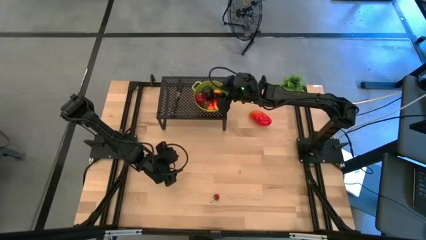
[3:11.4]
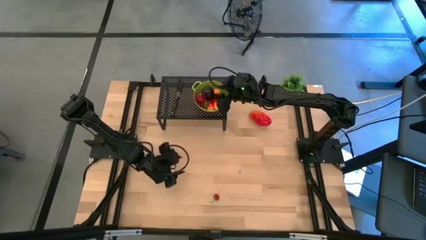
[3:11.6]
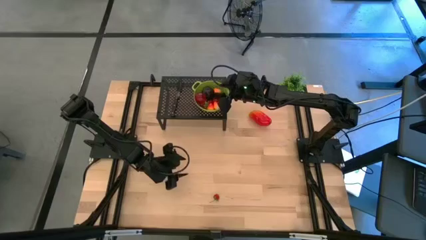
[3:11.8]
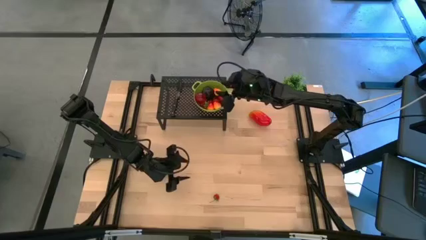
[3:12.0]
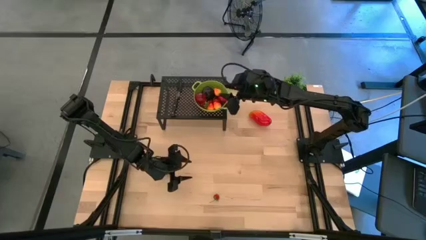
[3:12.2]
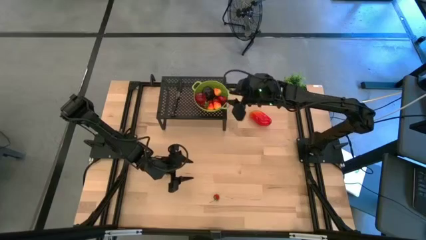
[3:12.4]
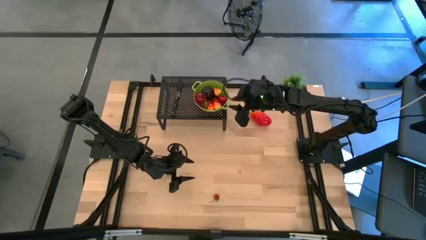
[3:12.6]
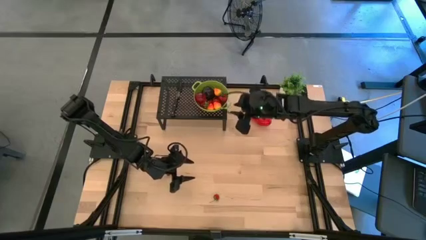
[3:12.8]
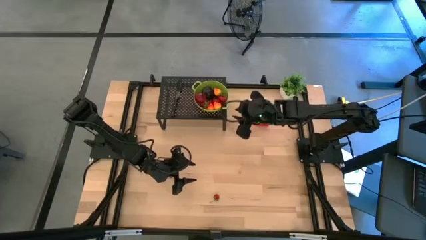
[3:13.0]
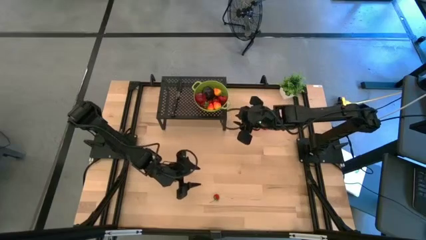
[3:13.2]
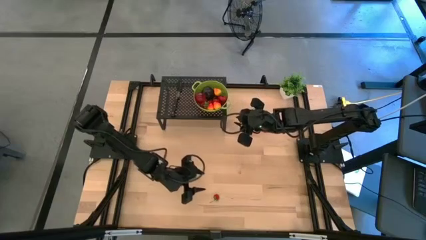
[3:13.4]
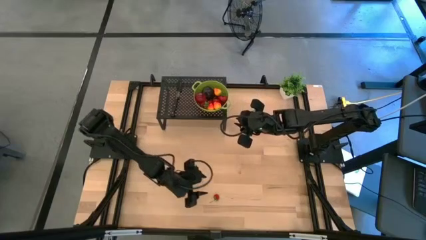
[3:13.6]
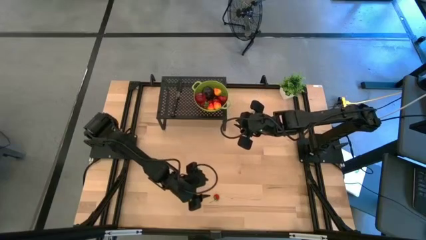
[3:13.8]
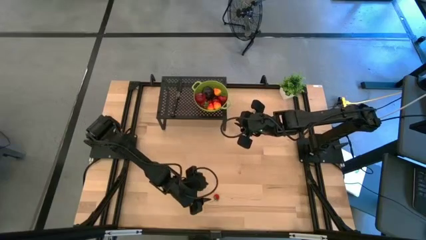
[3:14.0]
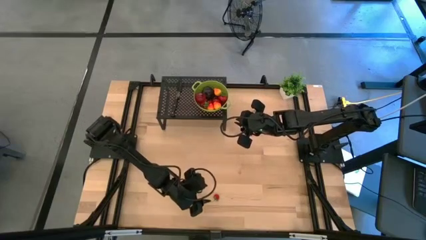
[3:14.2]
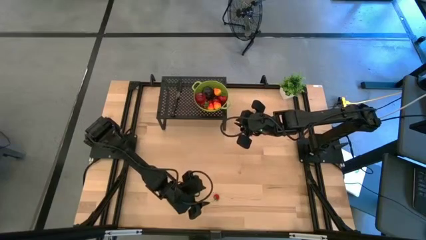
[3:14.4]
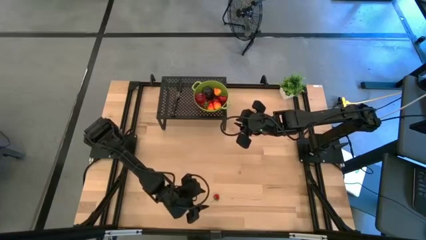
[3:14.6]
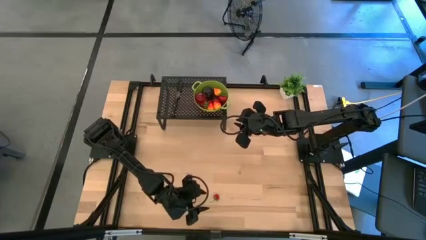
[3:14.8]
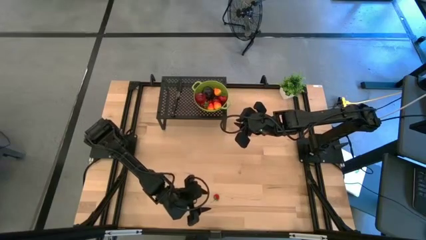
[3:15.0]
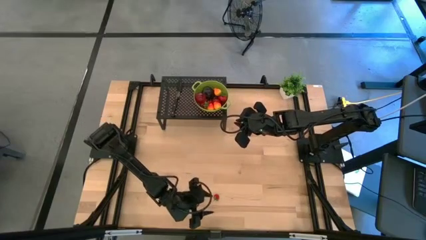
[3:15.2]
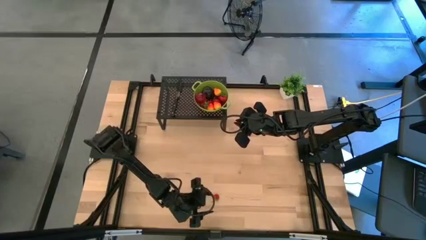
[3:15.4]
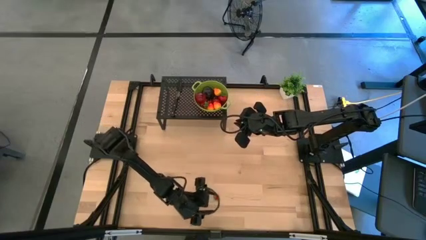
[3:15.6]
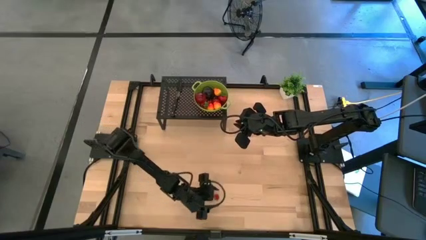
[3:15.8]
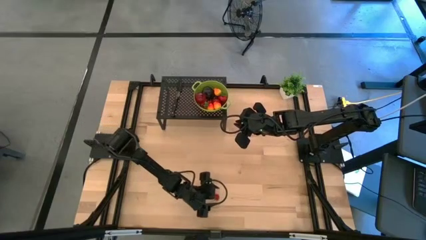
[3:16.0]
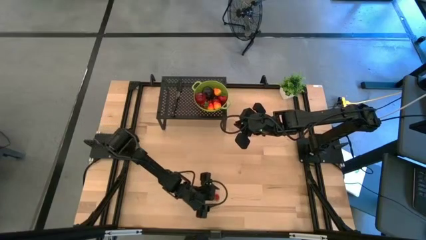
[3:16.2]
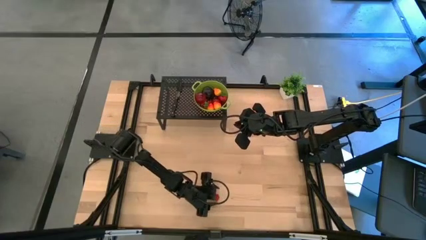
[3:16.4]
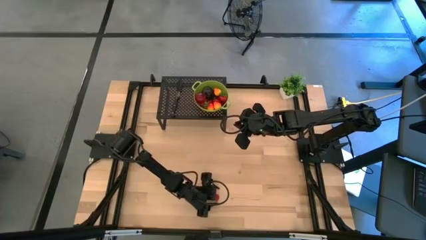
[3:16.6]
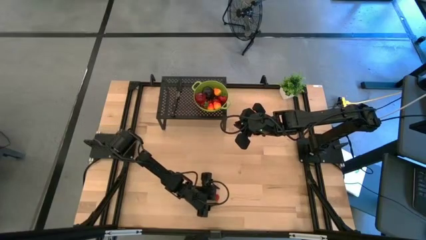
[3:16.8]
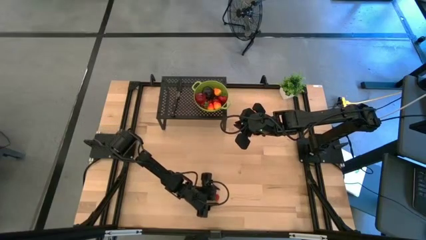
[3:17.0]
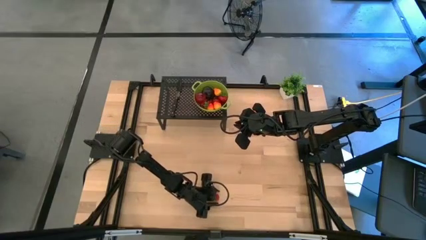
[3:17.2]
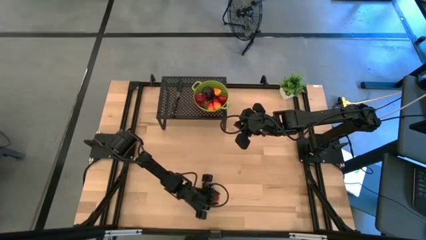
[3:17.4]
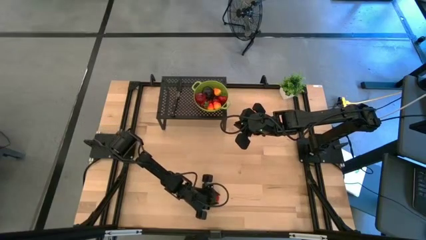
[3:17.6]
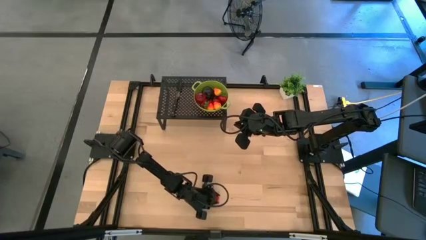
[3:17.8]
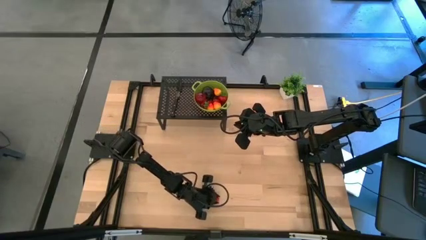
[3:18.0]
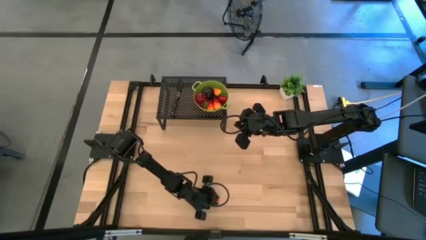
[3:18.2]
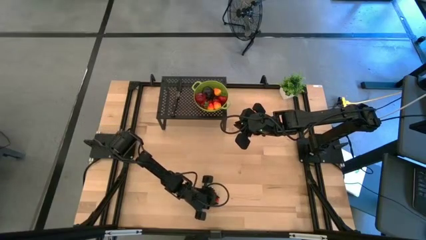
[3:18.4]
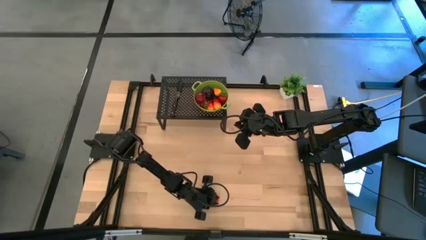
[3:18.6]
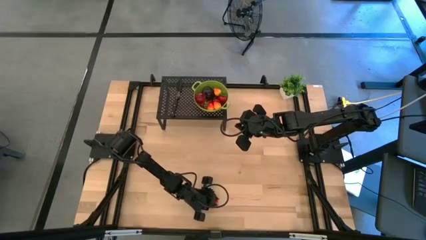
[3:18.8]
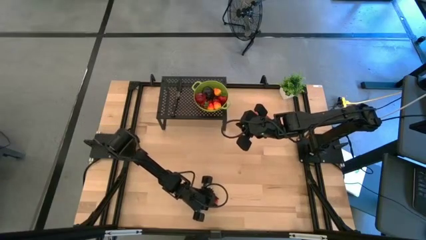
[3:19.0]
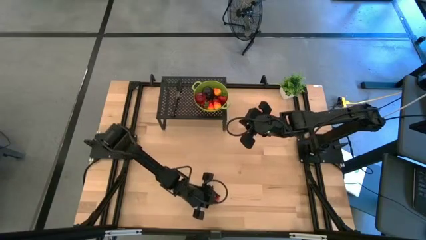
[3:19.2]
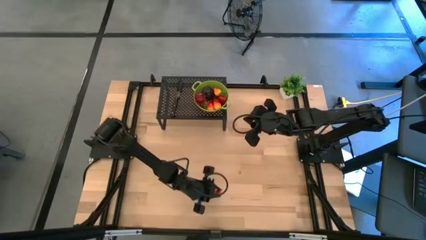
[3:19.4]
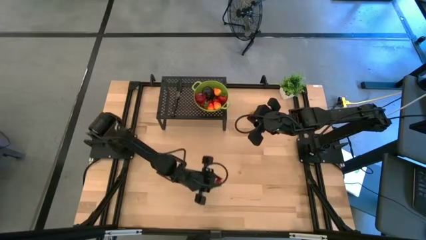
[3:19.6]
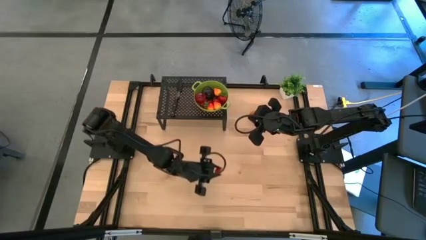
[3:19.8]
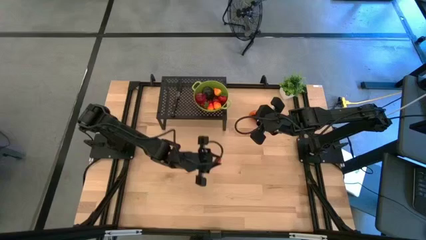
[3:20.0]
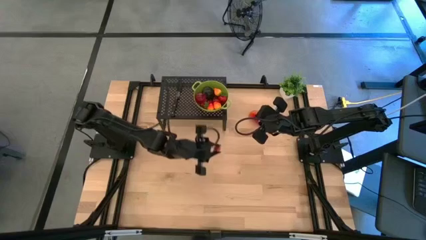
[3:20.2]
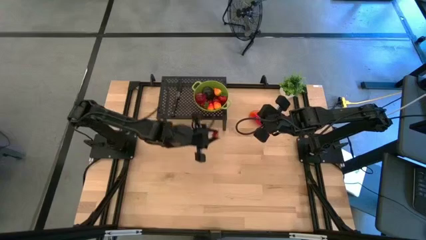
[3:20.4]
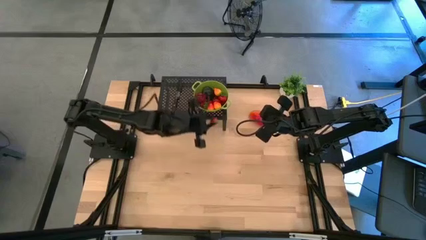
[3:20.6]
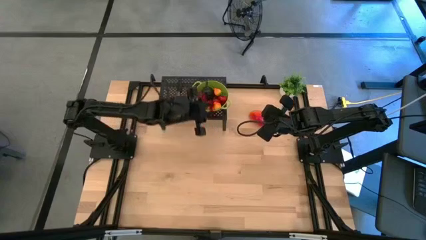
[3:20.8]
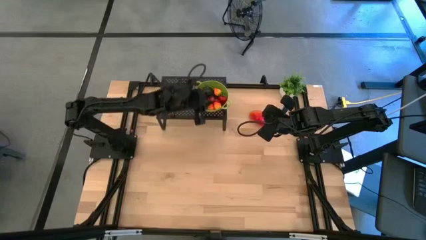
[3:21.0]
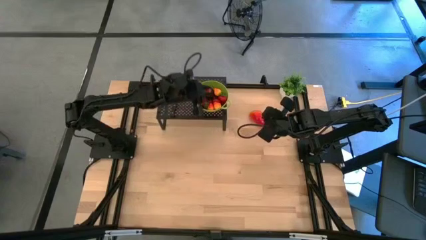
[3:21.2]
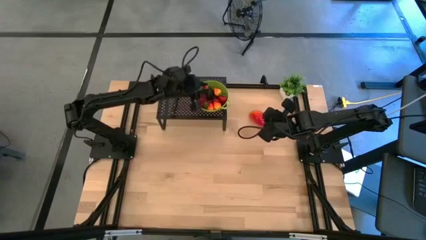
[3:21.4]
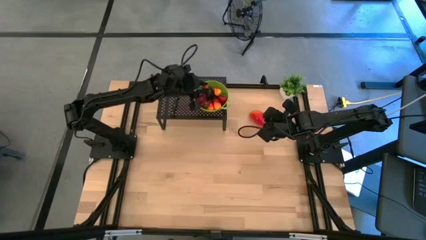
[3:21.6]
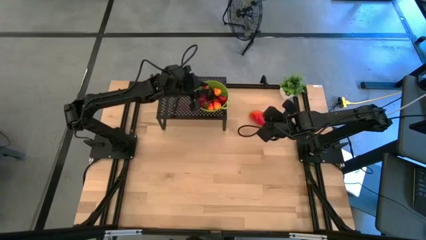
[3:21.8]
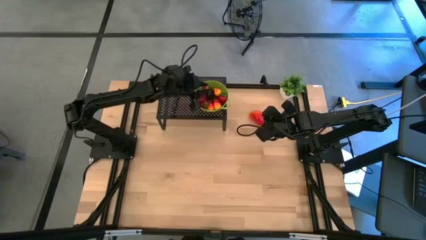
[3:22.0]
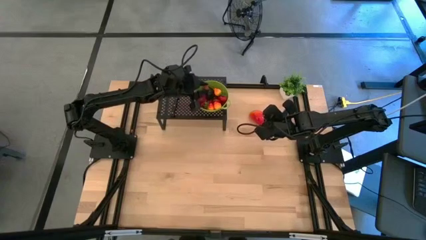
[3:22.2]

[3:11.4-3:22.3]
Task: Pick & Place Fruit
Put the strawberry into the green strainer bowl on the shelf

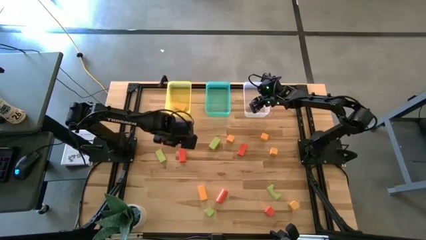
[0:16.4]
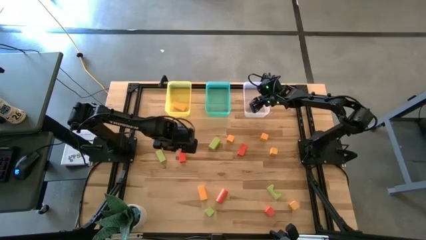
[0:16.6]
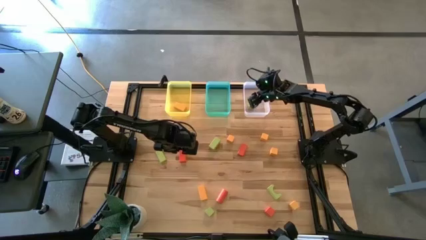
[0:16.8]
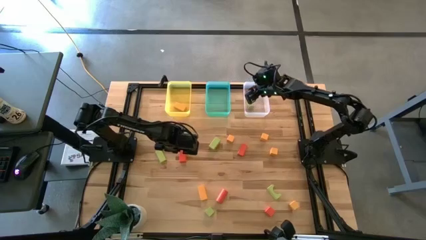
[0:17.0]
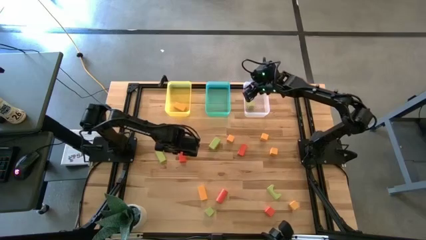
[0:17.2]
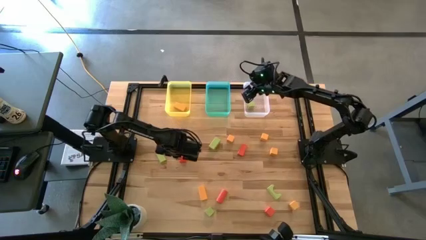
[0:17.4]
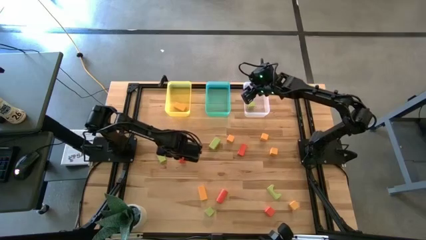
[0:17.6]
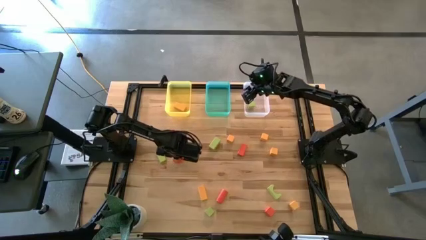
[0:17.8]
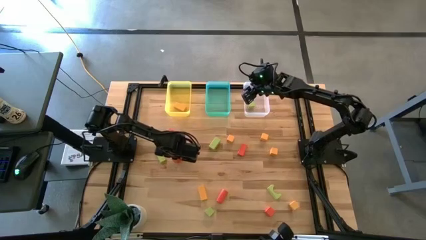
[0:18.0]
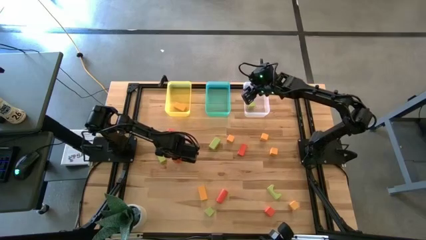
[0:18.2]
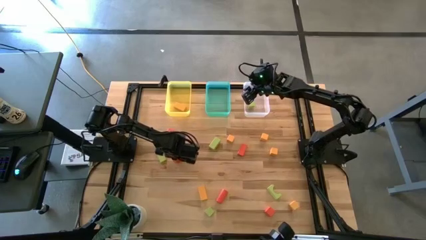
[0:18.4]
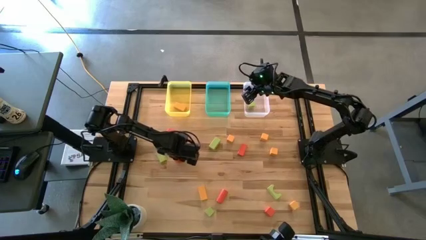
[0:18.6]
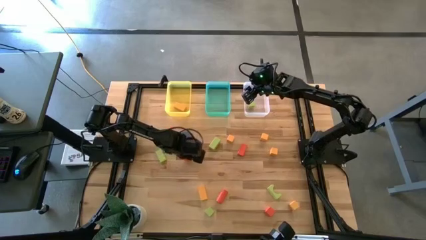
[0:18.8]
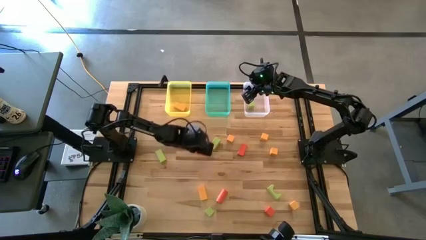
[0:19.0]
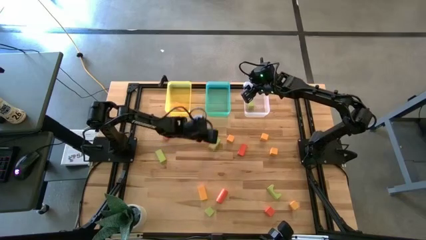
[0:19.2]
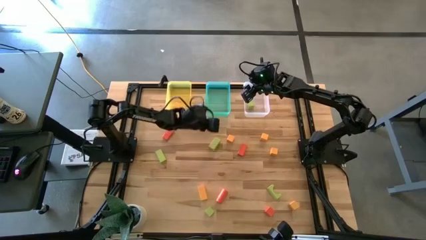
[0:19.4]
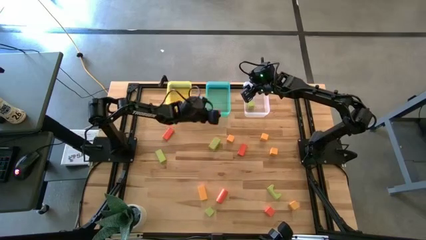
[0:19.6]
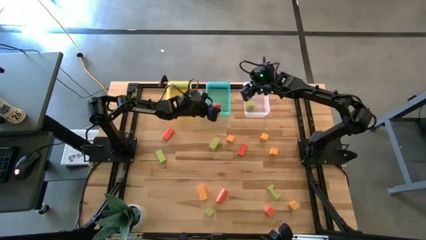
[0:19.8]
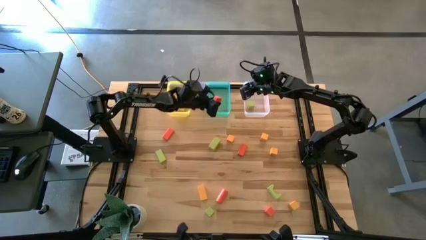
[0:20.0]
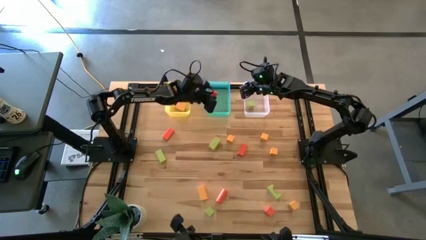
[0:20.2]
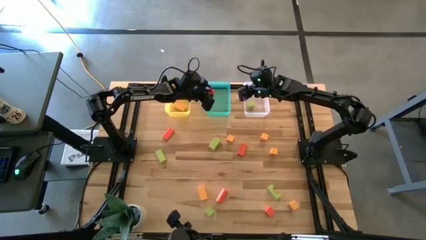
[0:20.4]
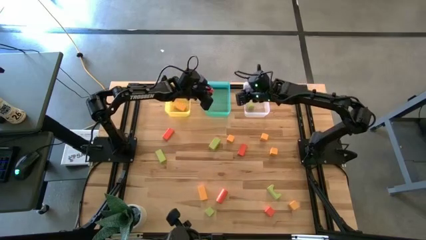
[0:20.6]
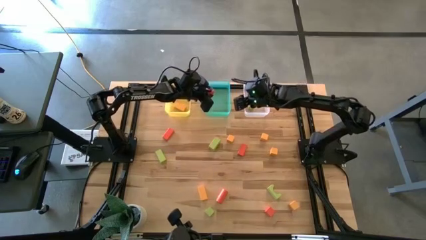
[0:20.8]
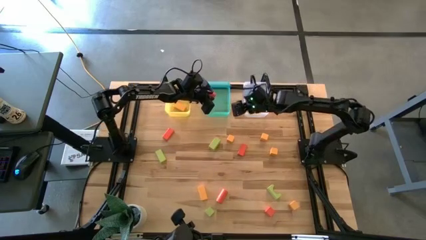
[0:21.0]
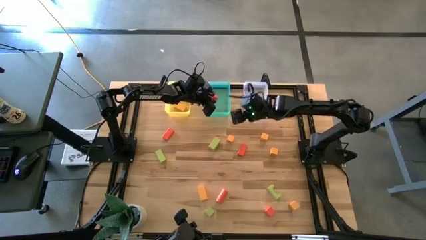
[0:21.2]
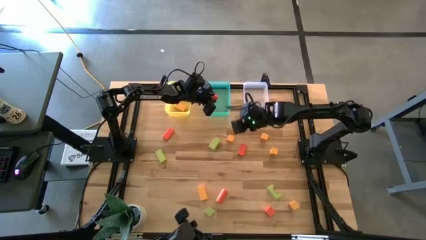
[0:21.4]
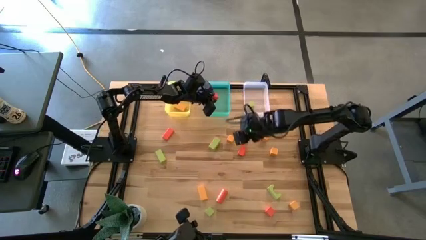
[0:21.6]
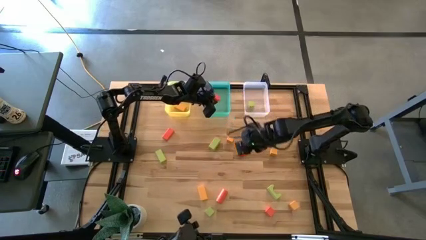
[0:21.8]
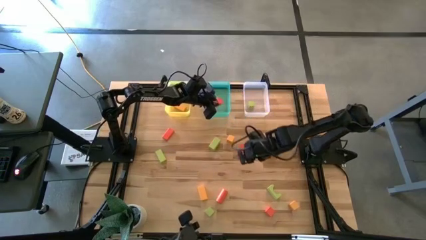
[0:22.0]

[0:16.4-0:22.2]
Task: Sort & place blocks by color
Put orange block into the green bin

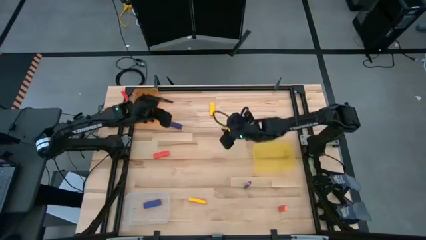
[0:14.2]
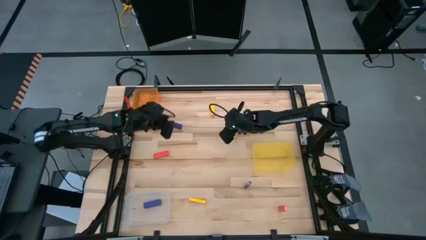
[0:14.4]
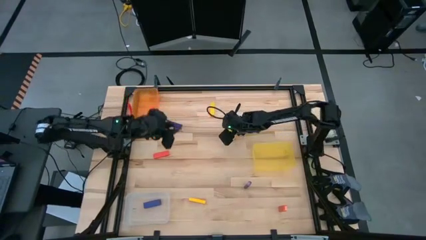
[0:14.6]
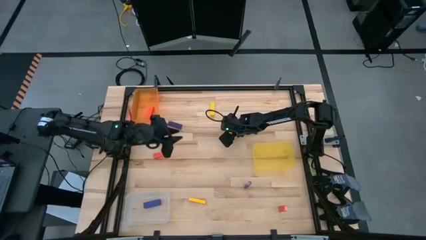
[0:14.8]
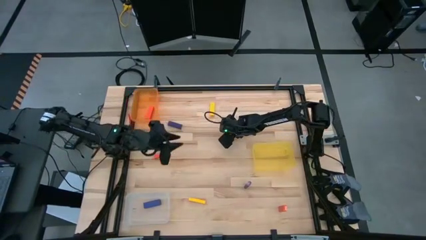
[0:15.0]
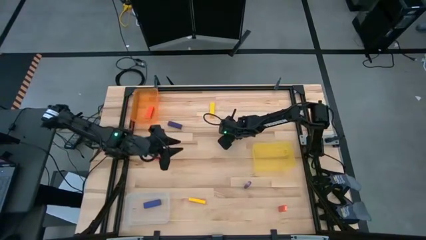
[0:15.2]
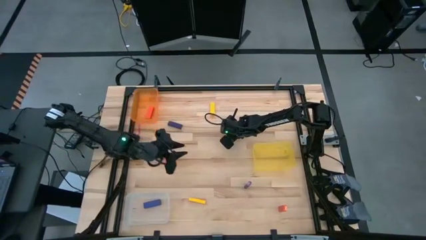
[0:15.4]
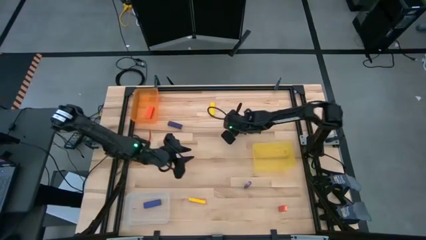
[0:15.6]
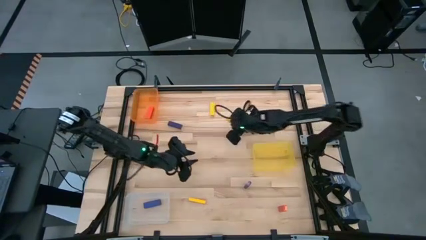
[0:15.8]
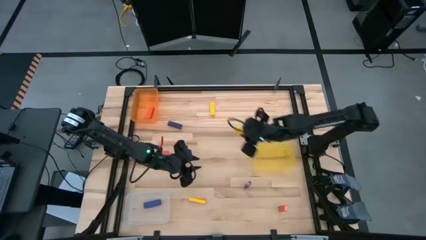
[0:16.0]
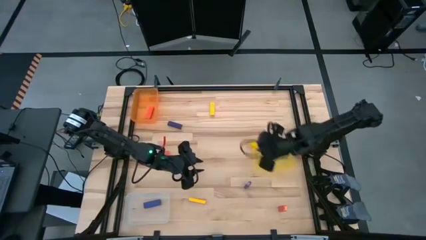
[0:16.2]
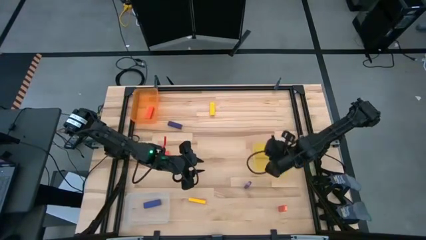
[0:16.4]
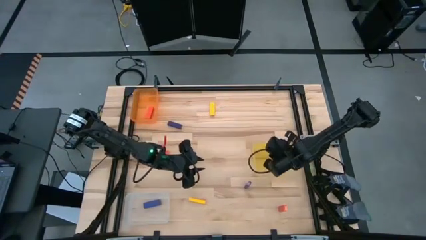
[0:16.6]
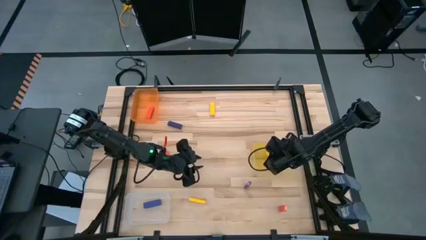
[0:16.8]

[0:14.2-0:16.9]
Task: Sort blocks
Put the top right yellow block into the yellow transparent bin
